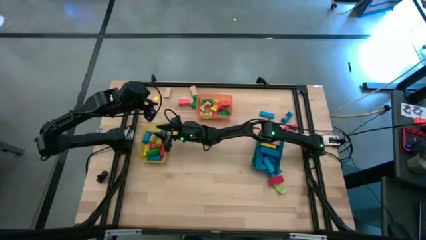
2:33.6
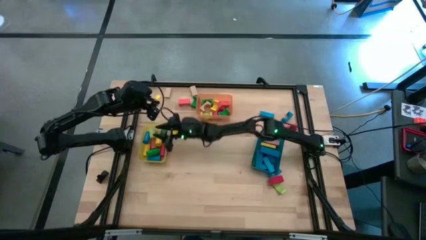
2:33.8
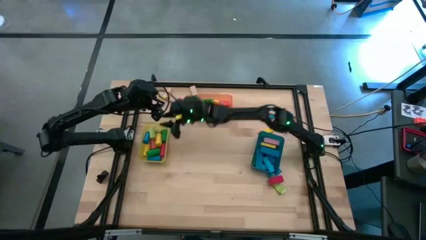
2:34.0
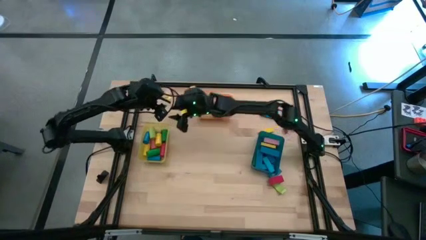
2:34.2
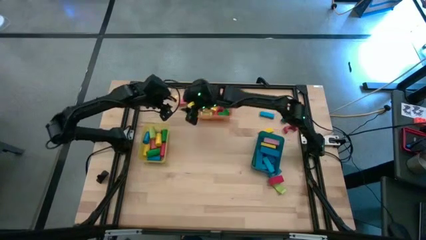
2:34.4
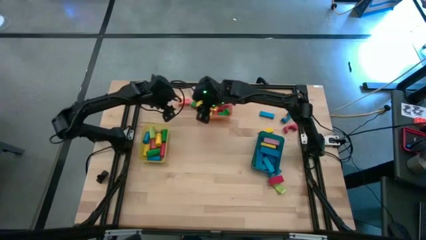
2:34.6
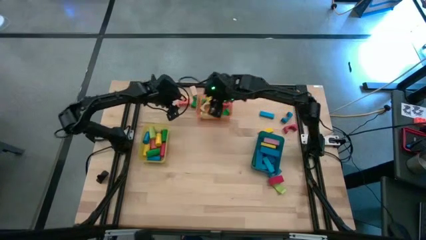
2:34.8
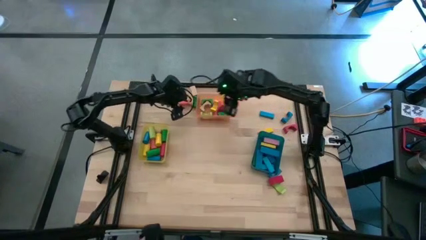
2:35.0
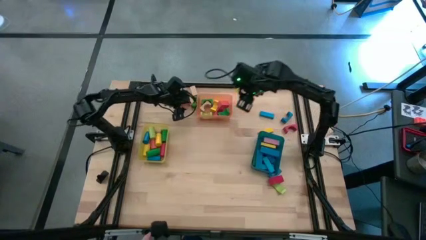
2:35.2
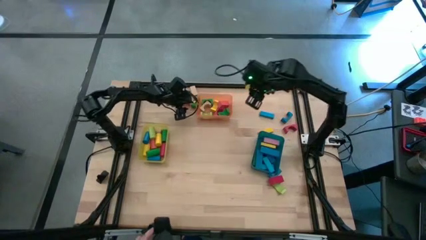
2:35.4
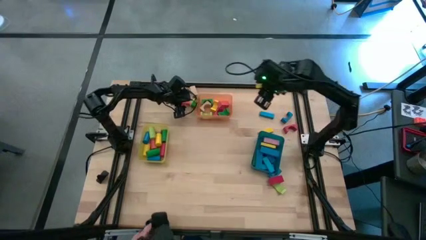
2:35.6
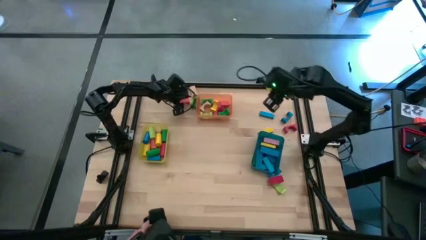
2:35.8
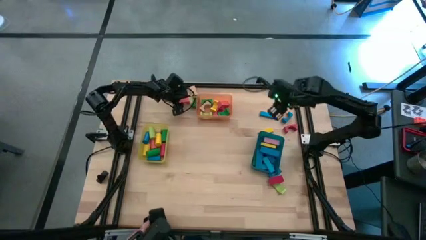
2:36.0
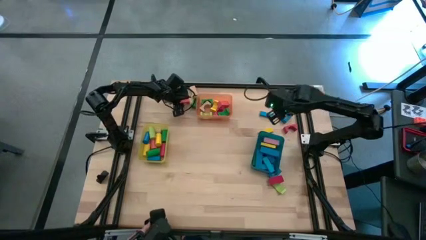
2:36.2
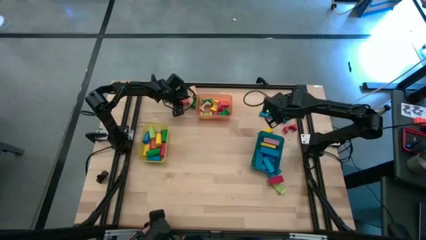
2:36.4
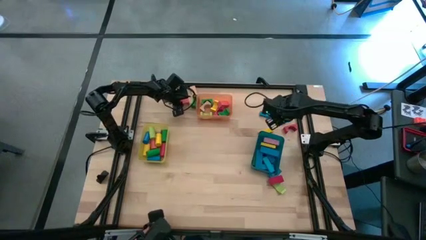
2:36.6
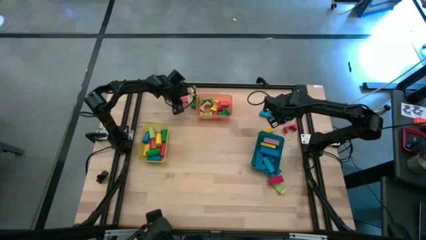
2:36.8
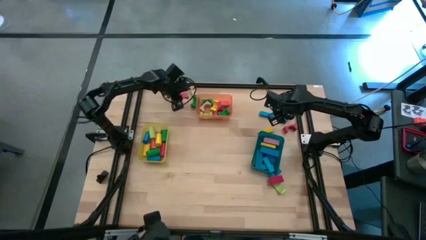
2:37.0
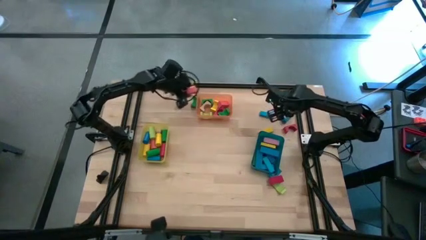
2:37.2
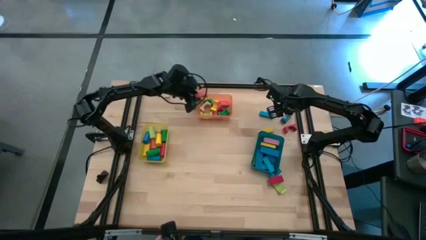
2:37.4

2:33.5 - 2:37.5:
Task: Sort blocks by size
Put the orange arch block into the orange bin

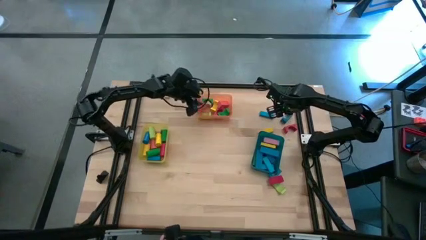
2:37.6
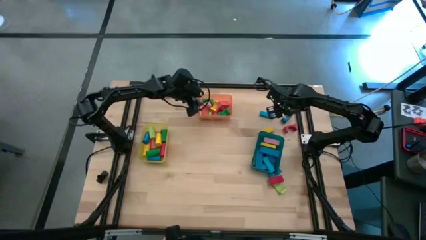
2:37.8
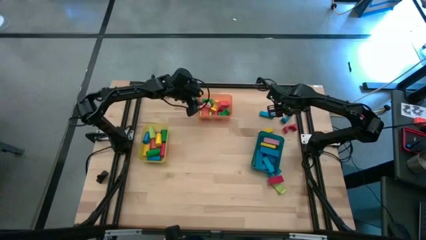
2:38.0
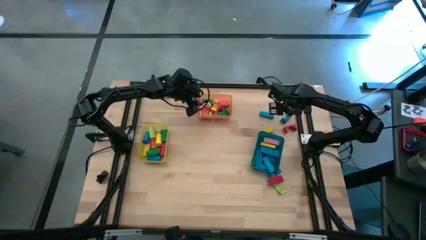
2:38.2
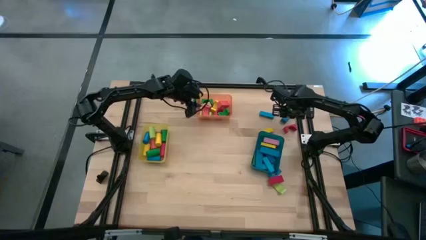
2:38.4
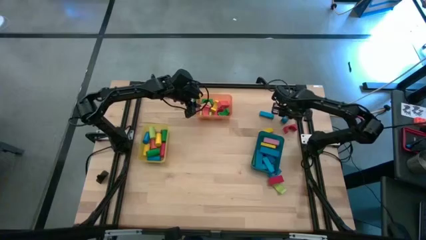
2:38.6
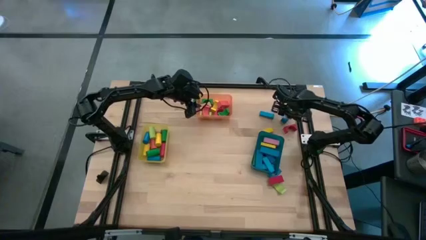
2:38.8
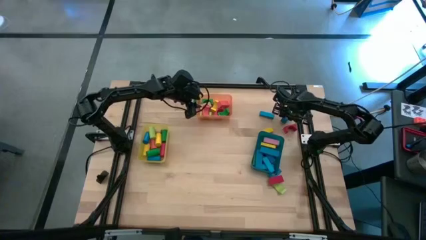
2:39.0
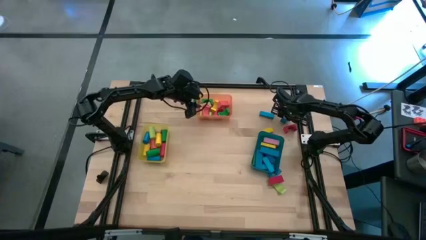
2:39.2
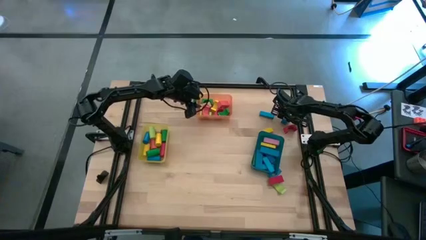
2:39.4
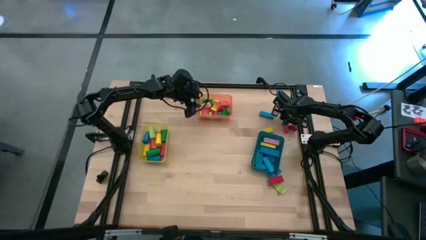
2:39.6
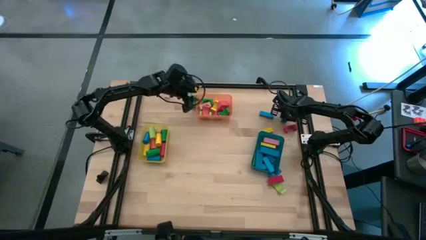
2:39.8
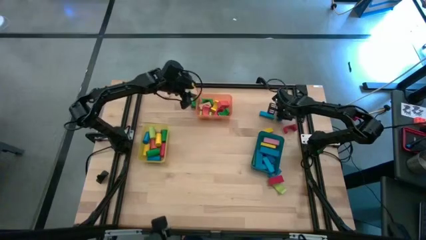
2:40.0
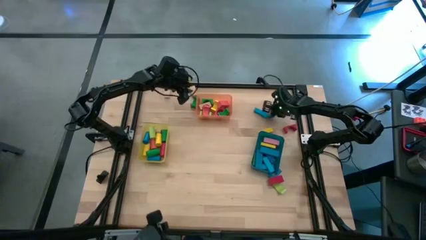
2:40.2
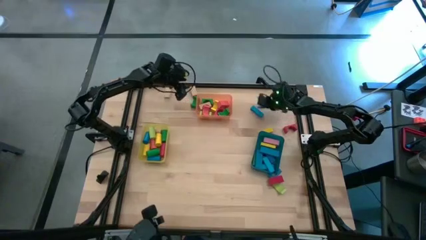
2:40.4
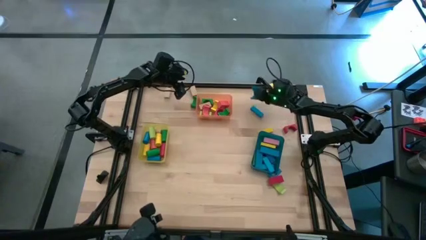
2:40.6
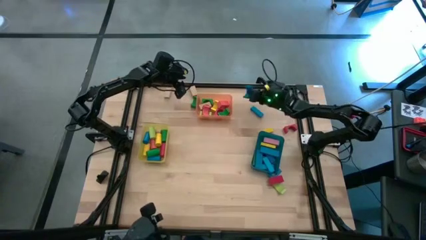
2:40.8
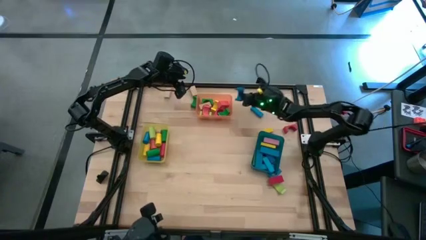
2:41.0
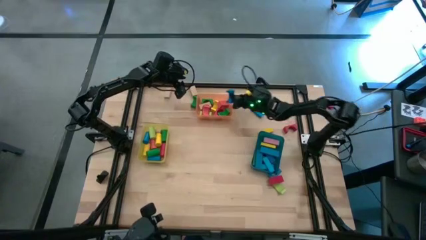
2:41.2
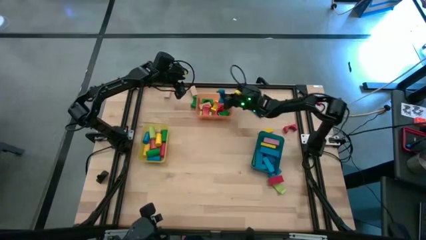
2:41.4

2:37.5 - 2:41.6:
Put the blue arch block into the orange bin

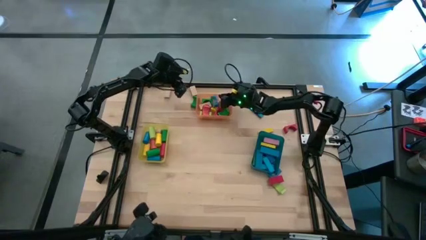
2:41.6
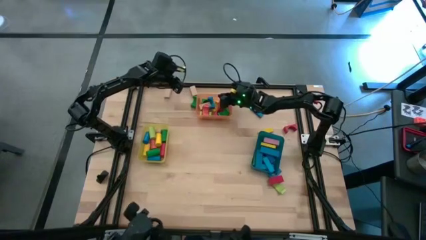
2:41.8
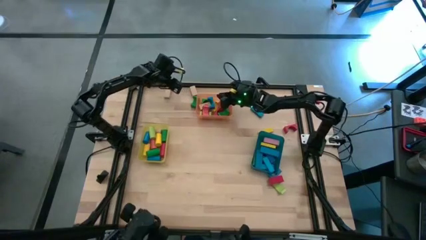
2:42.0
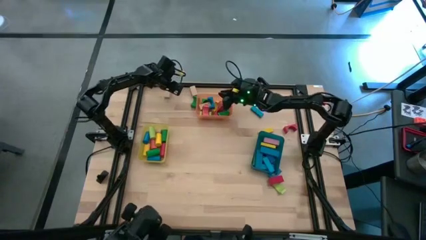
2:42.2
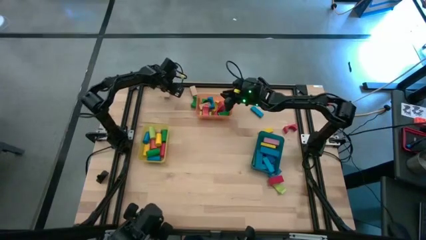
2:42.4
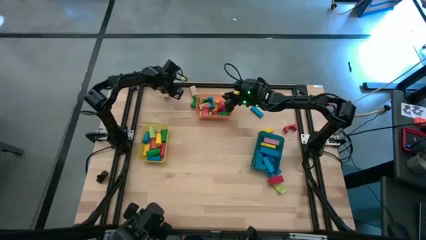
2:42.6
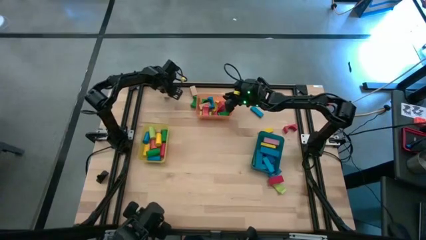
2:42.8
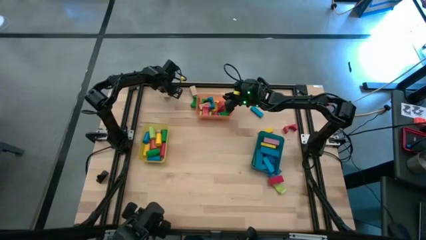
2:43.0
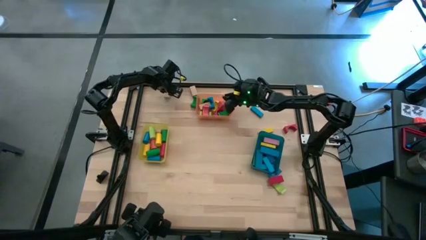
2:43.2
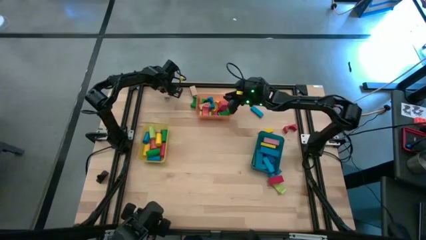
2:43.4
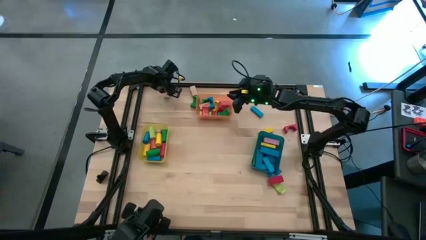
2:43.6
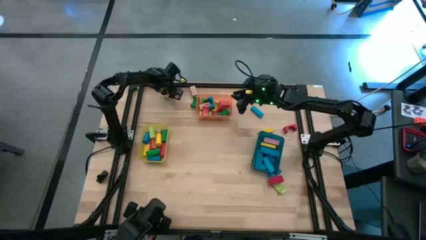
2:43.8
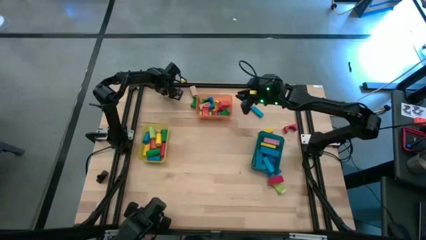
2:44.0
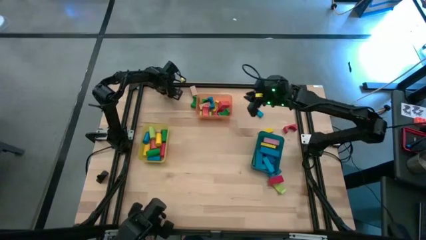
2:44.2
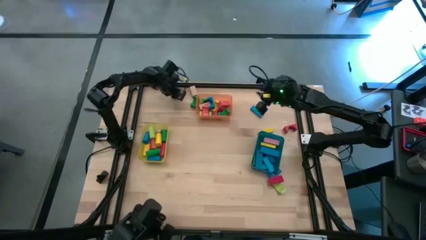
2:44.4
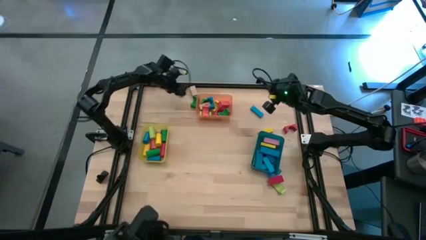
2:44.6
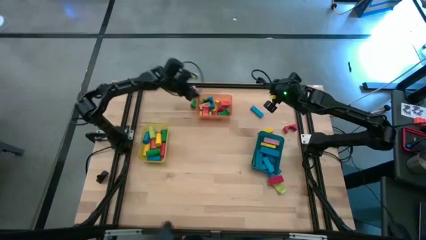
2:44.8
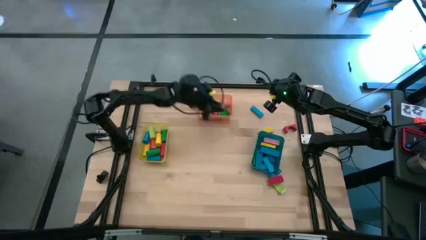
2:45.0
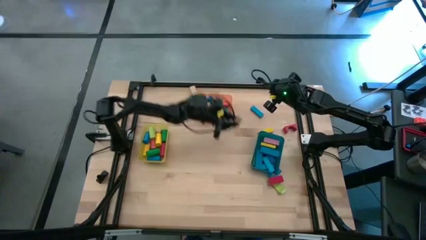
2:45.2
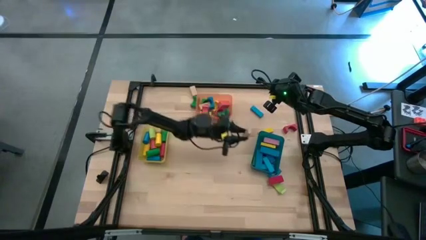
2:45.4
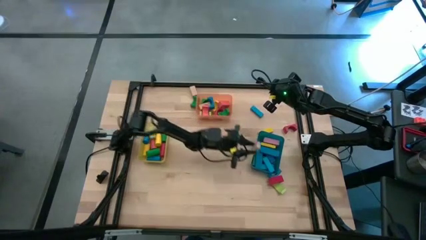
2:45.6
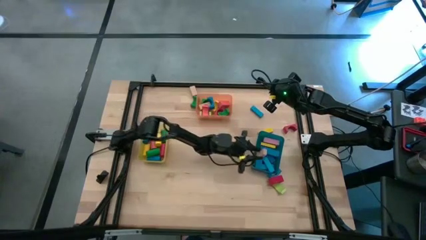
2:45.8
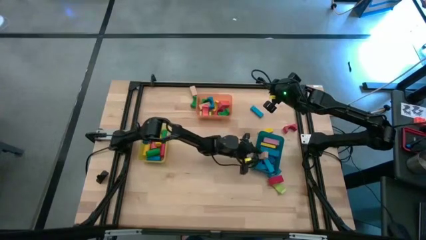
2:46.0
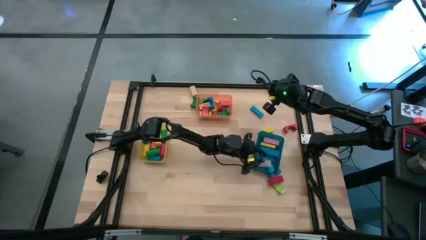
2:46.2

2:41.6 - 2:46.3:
Put the brown rectangle block into the blue bin

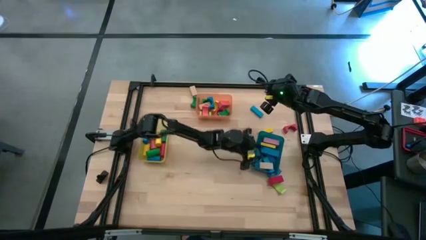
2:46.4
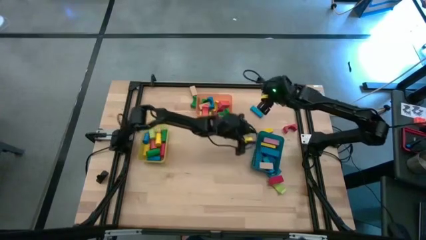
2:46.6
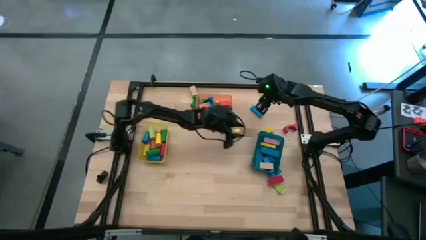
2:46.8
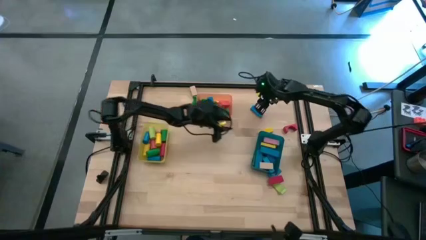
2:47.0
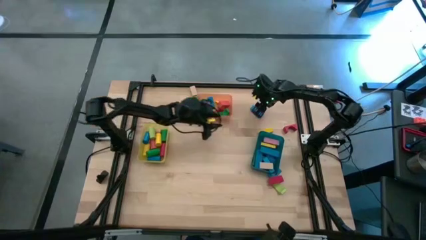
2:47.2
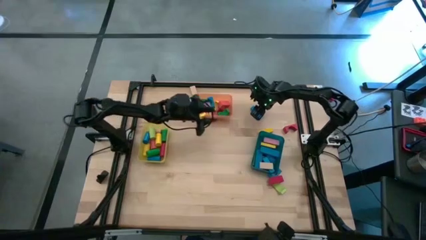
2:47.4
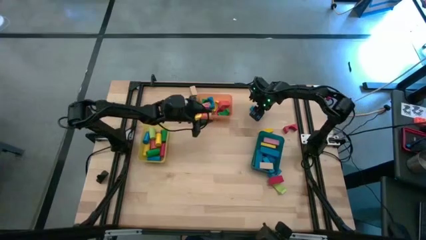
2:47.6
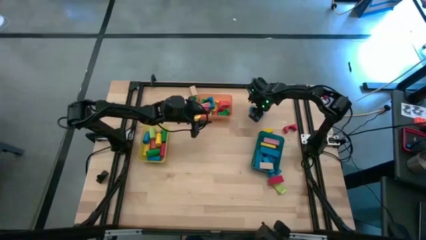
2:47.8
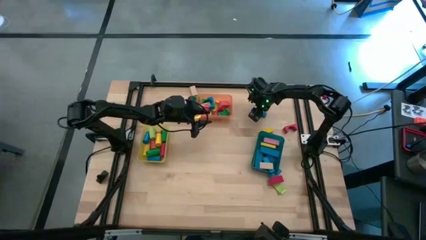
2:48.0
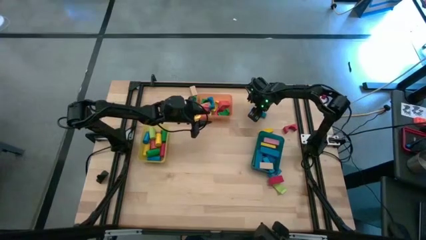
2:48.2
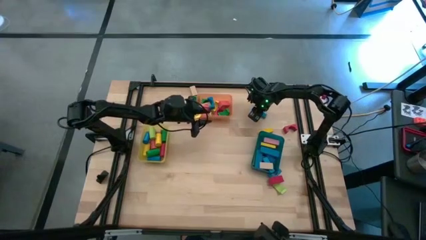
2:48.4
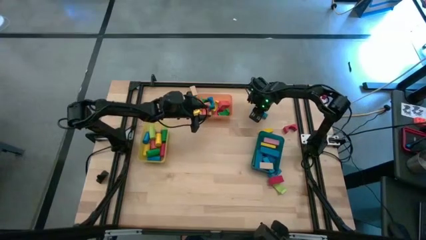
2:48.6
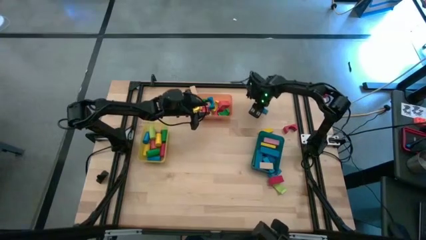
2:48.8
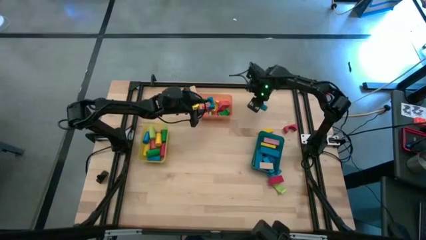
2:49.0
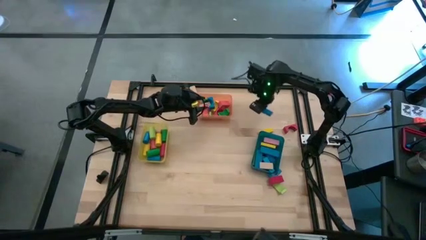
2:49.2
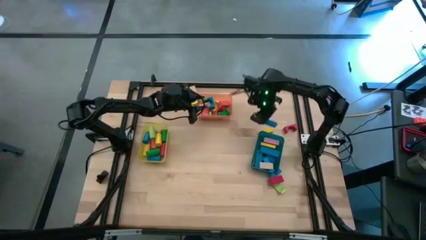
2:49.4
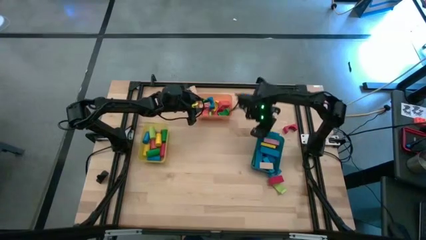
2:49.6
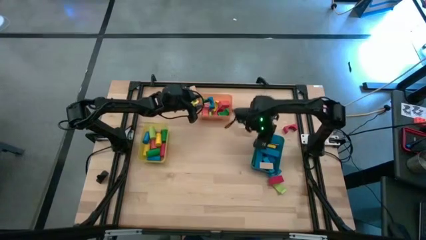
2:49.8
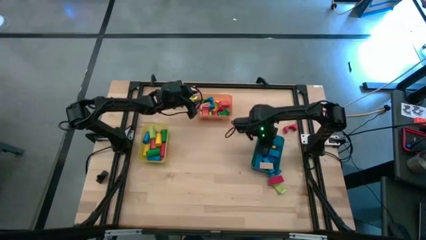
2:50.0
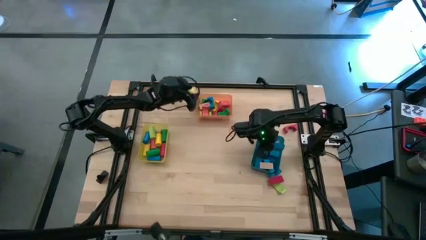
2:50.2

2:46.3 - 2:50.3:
Put the blue rectangle block into the blue bin
